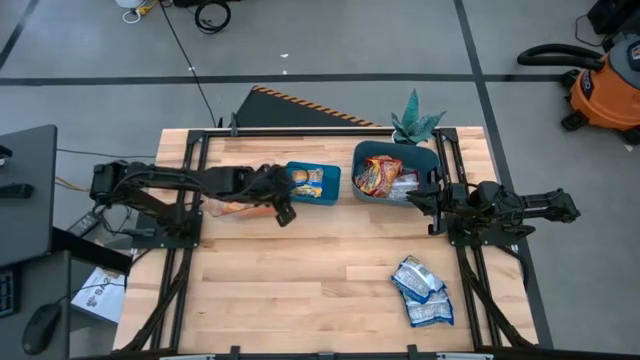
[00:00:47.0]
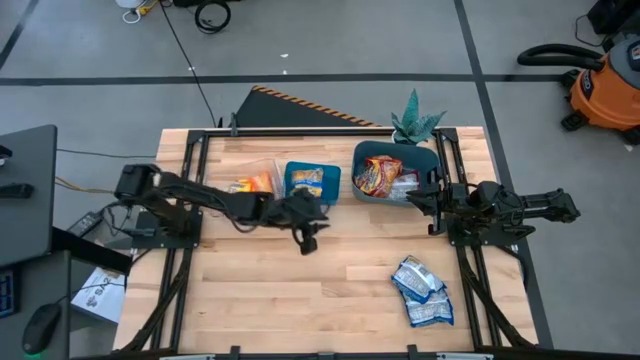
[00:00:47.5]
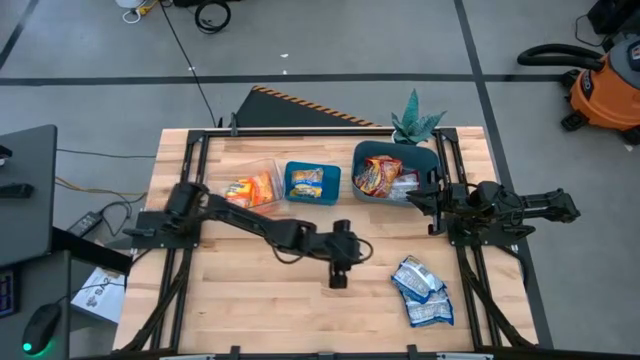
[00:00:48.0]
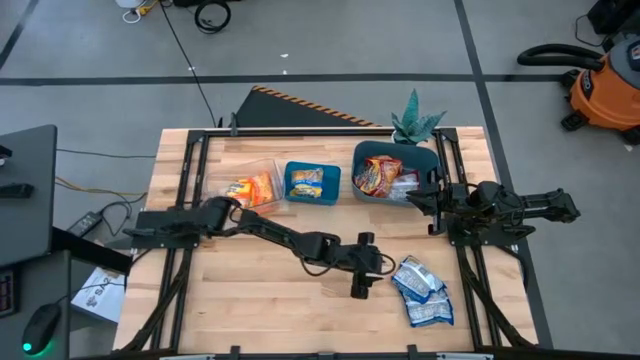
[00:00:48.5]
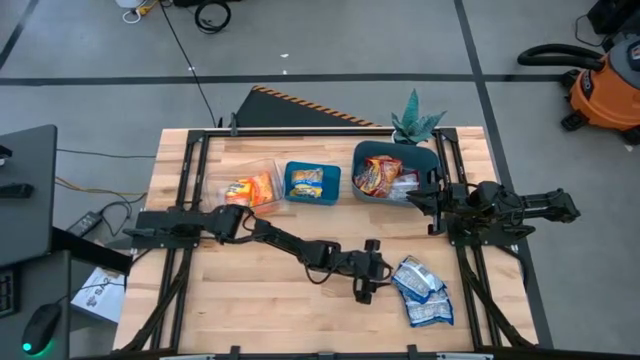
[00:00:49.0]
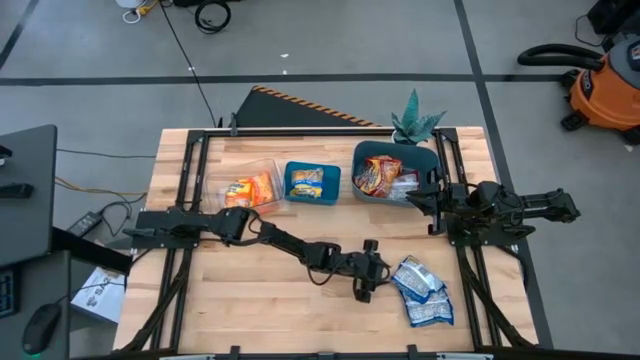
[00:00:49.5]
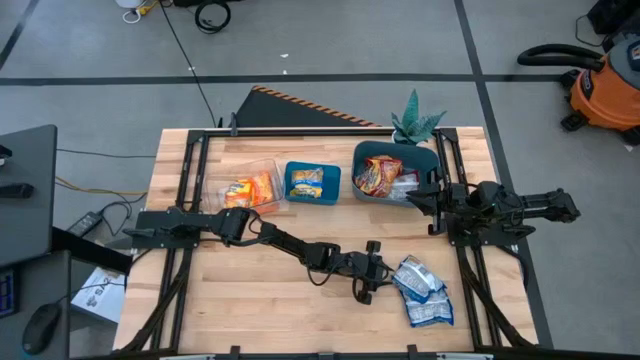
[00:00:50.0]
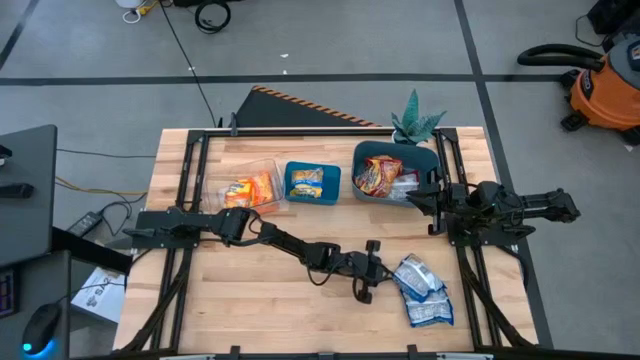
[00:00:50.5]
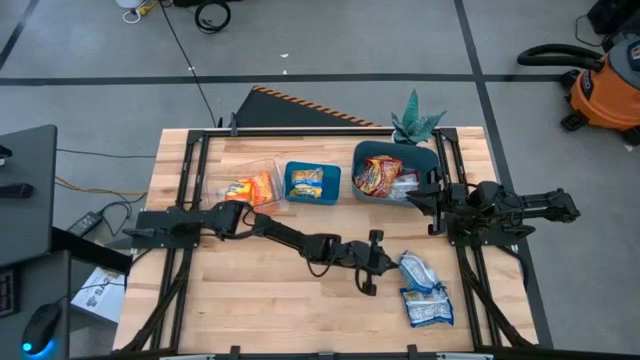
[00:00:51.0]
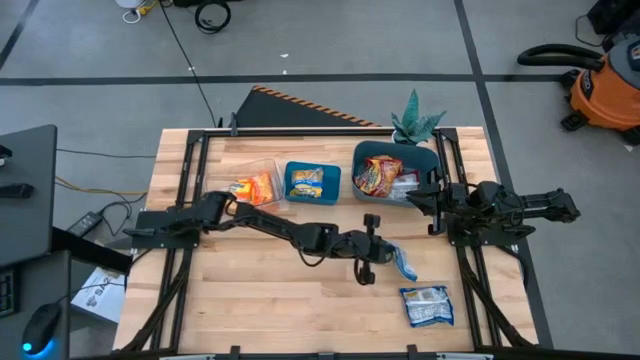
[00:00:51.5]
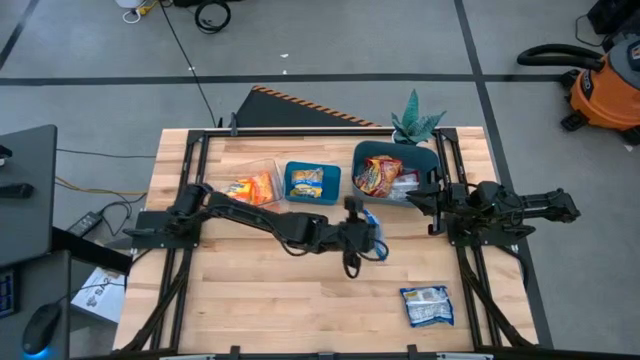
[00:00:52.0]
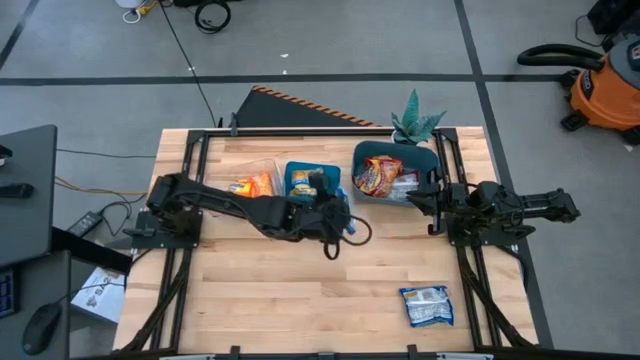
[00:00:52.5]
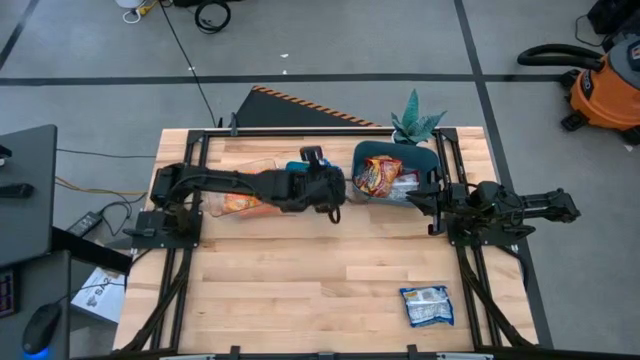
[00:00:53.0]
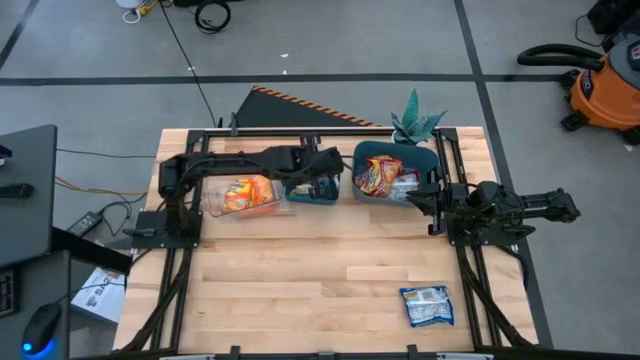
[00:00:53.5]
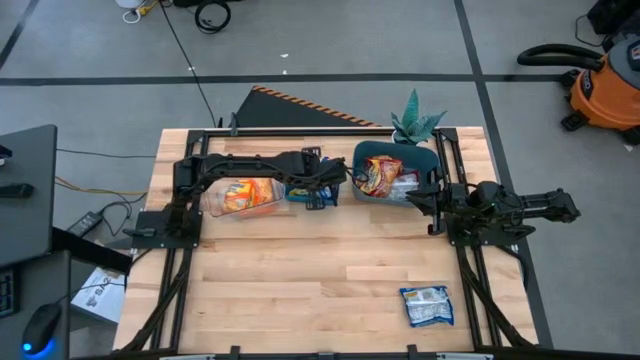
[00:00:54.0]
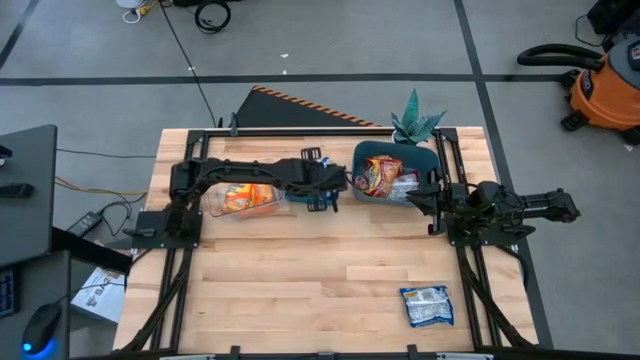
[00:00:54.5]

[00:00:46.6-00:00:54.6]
Task: Sort Maruchan noodles
Put the blue noodle pack into the blue bin

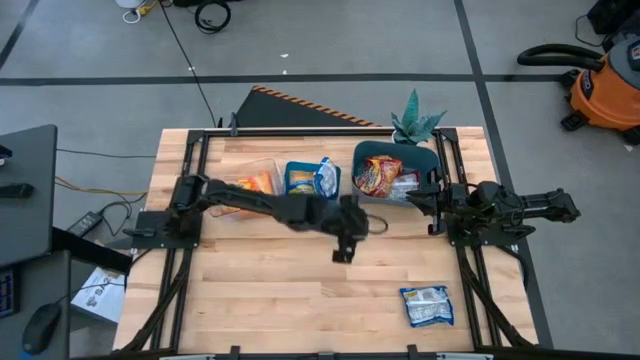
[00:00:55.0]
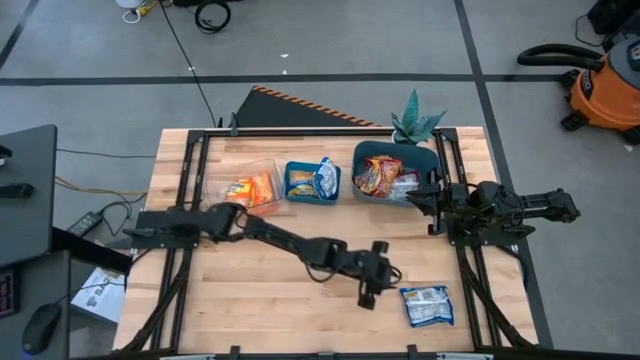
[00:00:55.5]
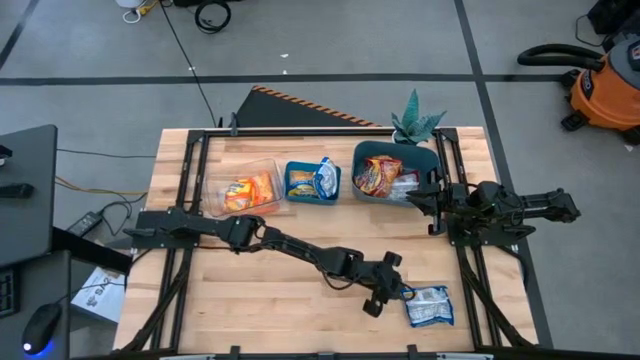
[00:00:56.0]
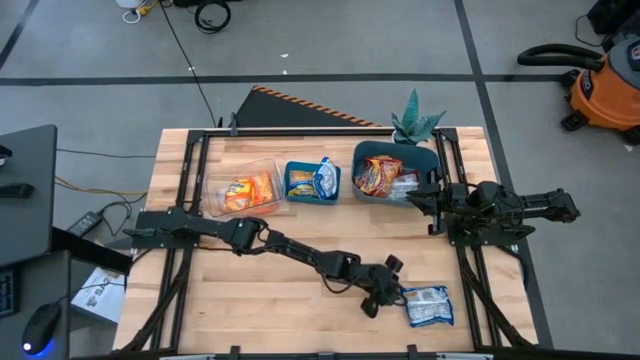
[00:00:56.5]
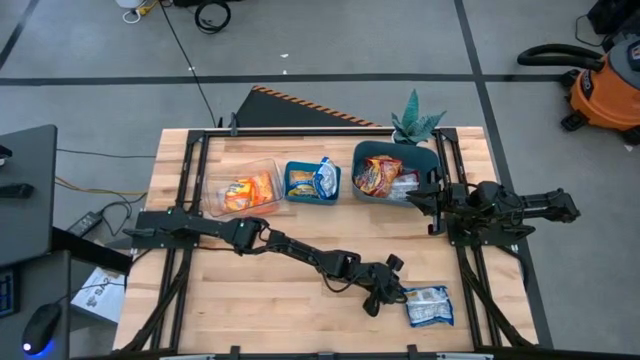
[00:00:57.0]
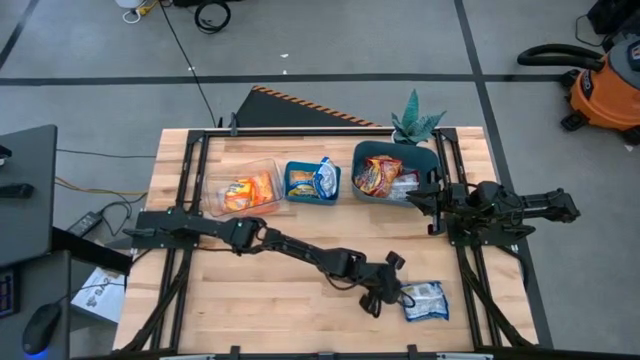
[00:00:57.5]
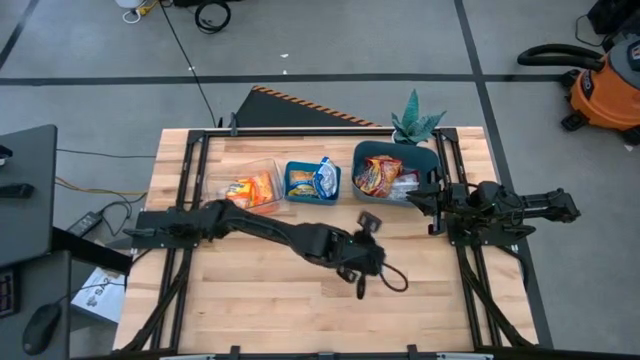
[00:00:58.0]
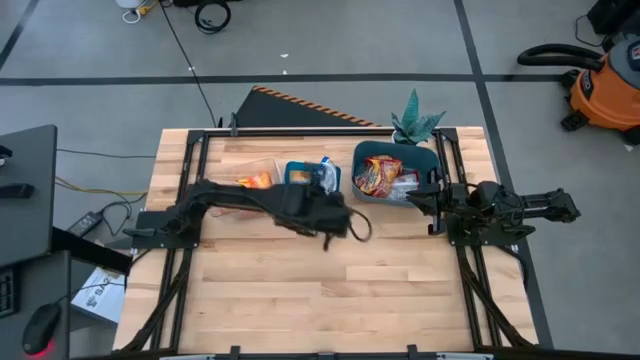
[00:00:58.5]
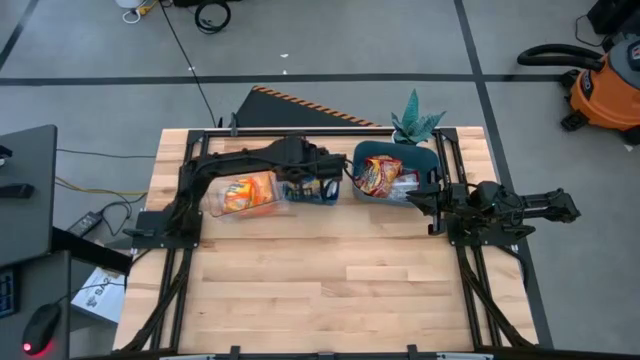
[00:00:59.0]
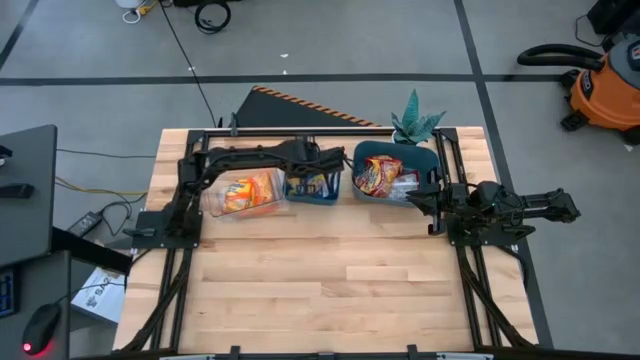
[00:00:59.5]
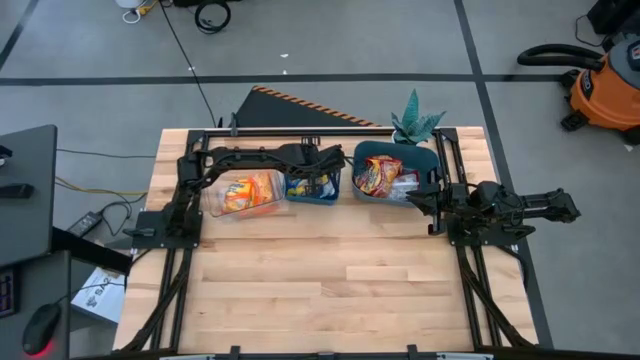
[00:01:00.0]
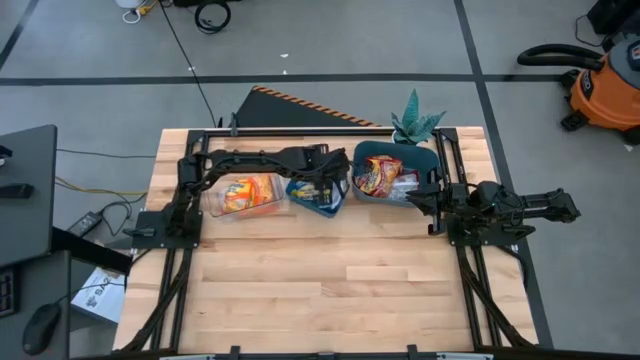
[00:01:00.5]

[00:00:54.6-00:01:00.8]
Put the blue noodle pack into the blue bin

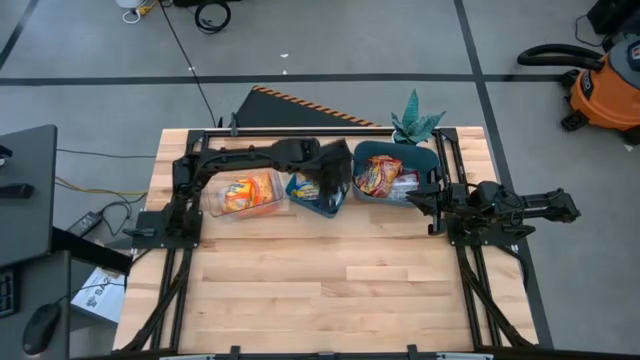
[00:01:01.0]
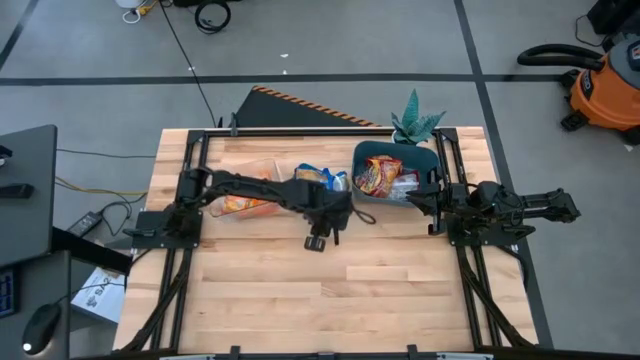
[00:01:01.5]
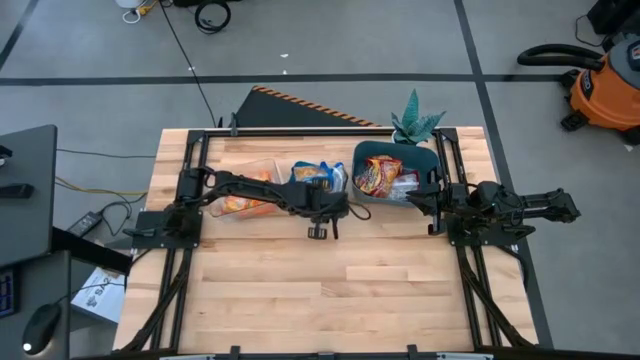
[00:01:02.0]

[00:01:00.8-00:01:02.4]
Adjust the blue bin on the table

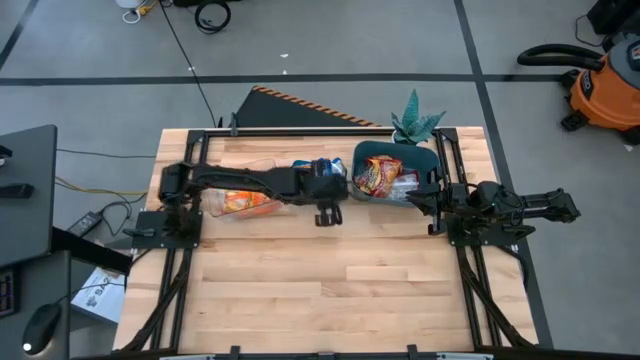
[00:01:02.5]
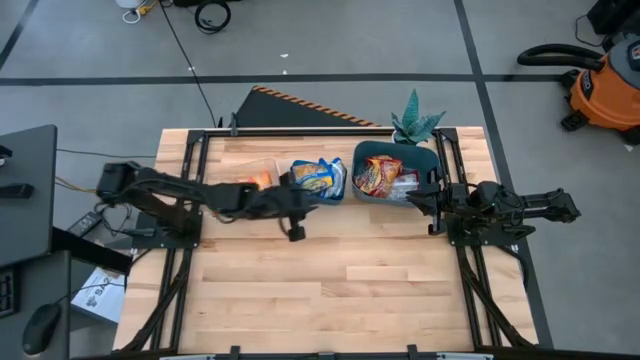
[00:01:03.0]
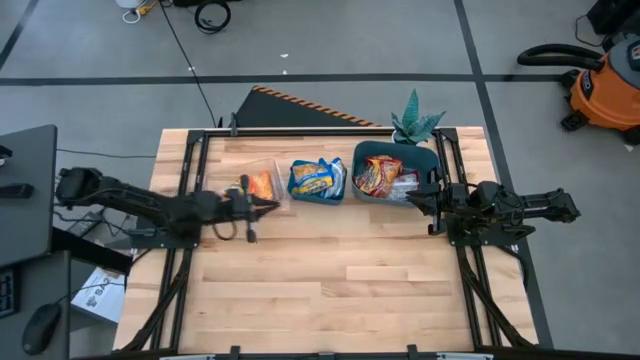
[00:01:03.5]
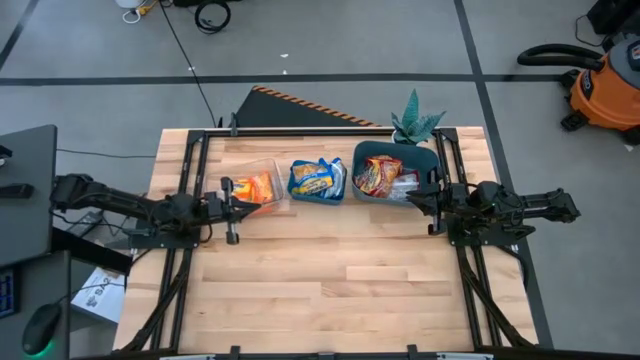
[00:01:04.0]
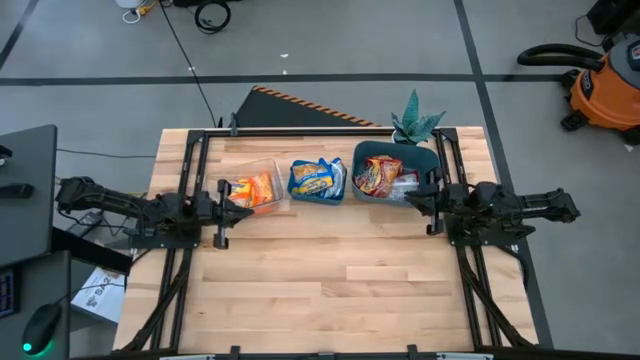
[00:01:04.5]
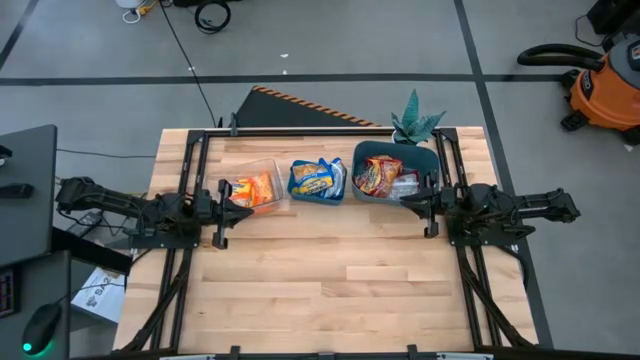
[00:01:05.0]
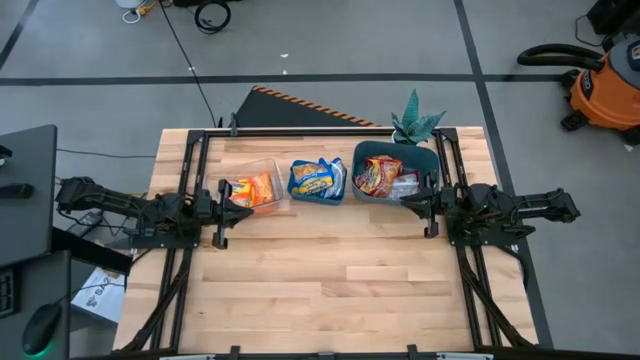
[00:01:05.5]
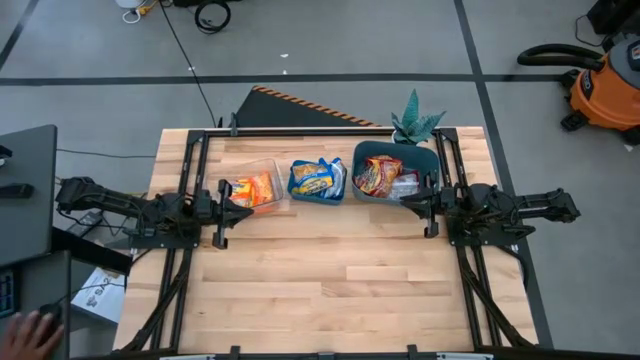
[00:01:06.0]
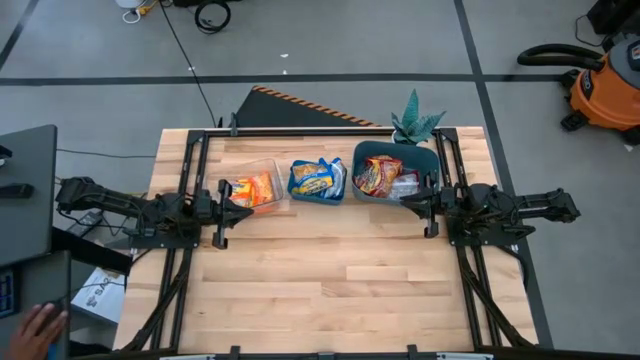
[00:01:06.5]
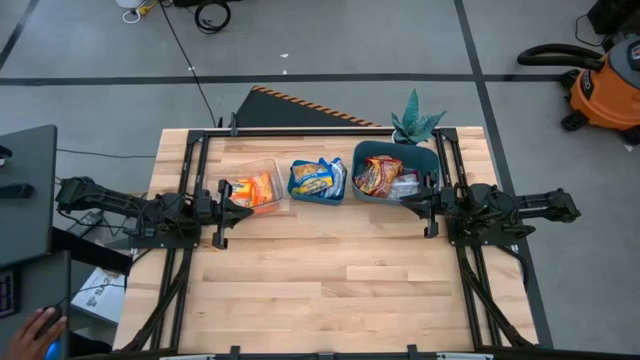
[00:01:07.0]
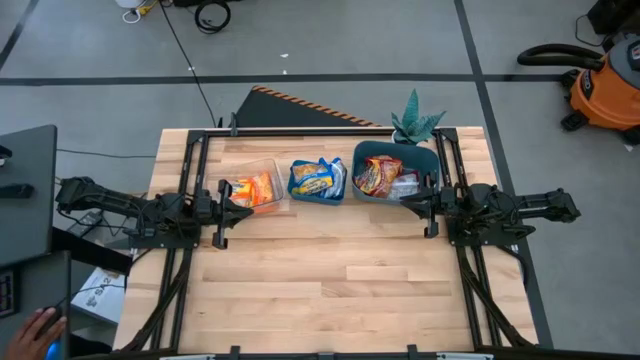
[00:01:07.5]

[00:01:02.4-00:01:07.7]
Return to Home Position
